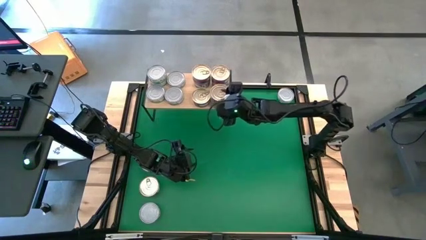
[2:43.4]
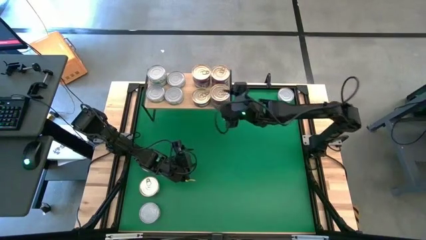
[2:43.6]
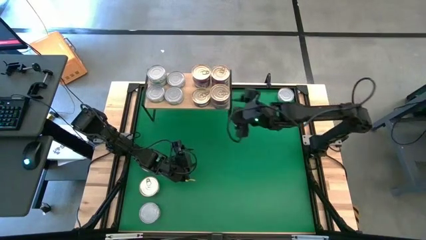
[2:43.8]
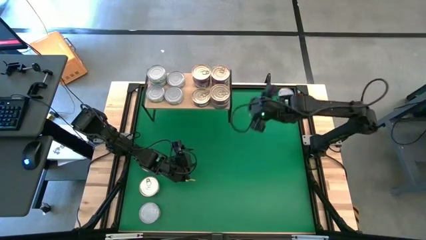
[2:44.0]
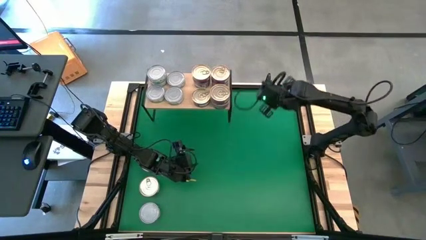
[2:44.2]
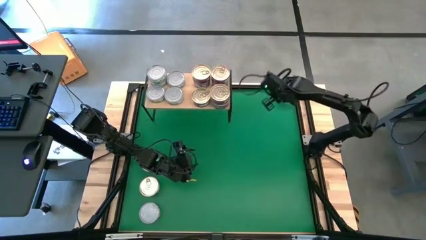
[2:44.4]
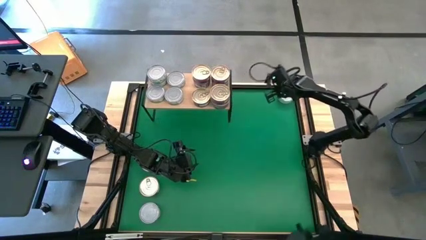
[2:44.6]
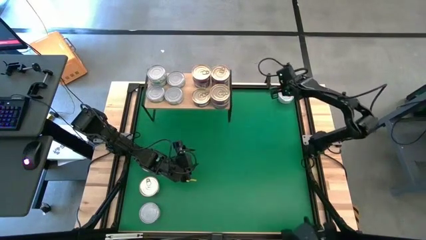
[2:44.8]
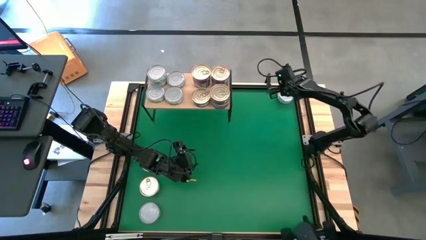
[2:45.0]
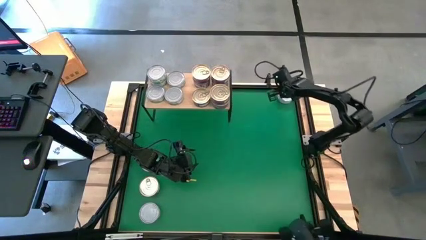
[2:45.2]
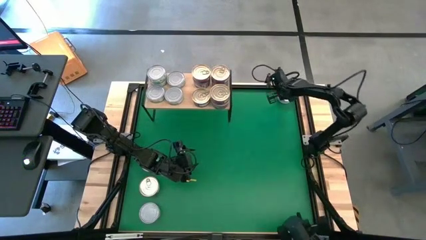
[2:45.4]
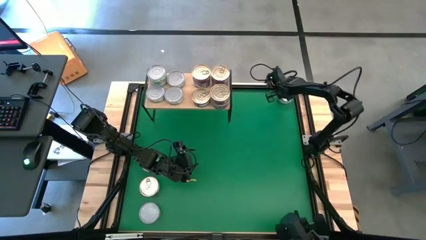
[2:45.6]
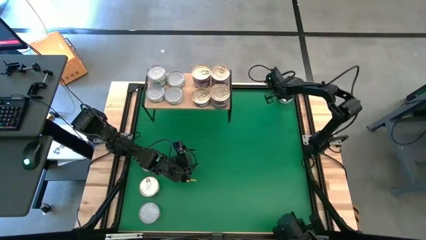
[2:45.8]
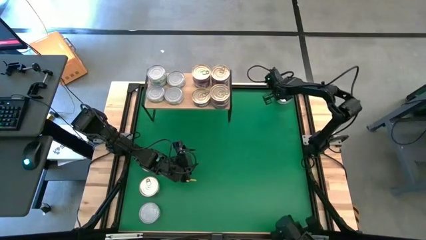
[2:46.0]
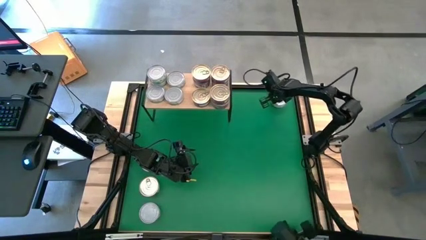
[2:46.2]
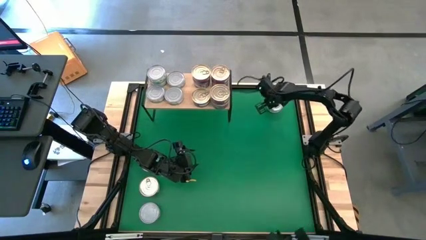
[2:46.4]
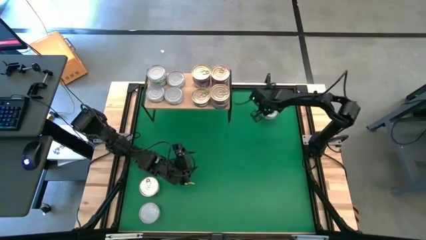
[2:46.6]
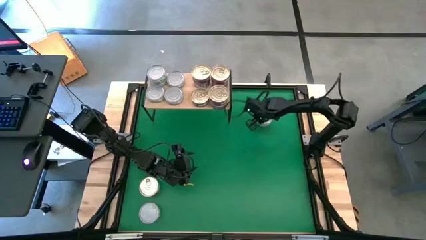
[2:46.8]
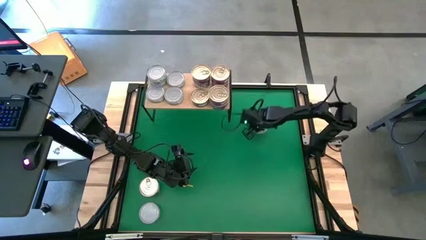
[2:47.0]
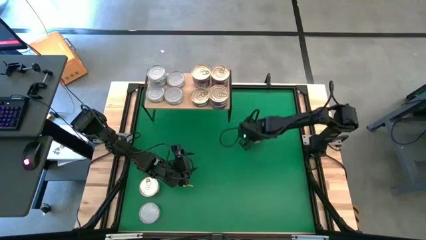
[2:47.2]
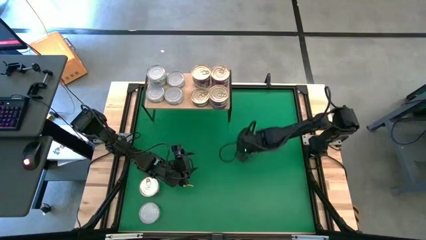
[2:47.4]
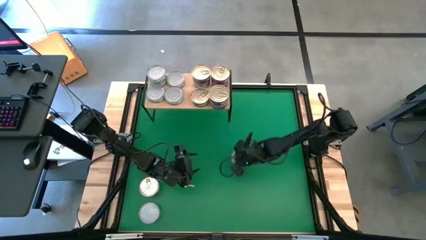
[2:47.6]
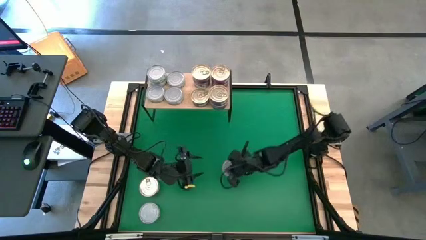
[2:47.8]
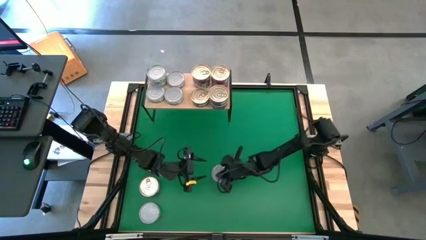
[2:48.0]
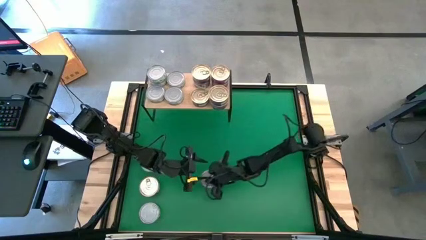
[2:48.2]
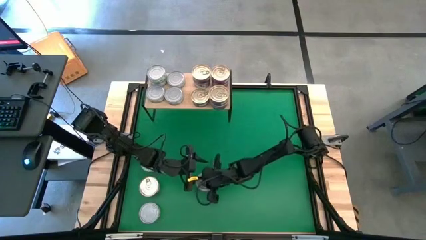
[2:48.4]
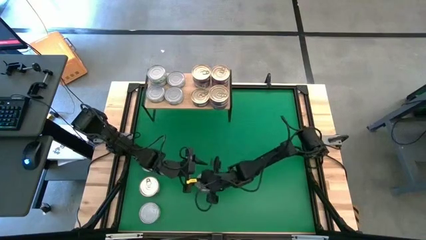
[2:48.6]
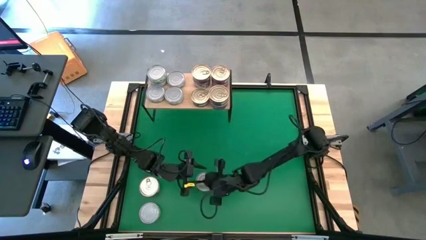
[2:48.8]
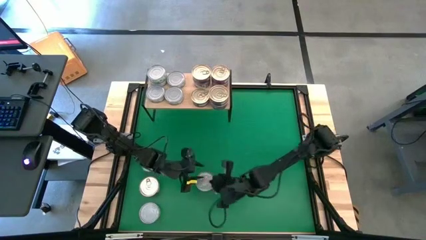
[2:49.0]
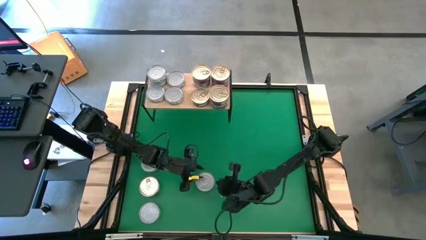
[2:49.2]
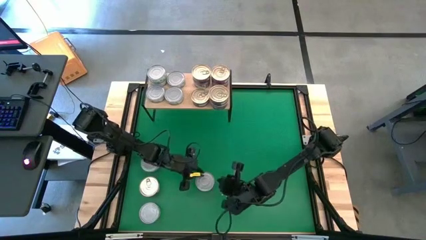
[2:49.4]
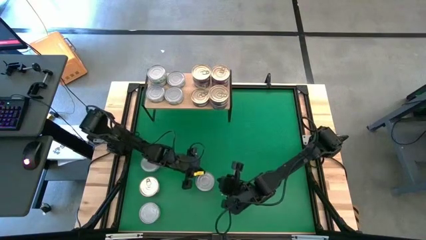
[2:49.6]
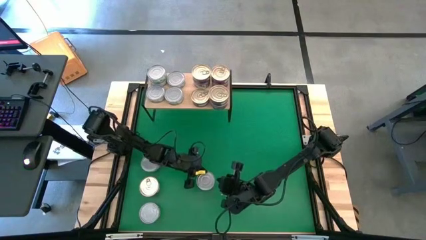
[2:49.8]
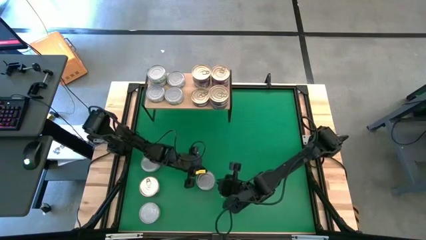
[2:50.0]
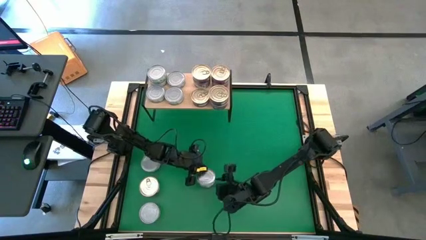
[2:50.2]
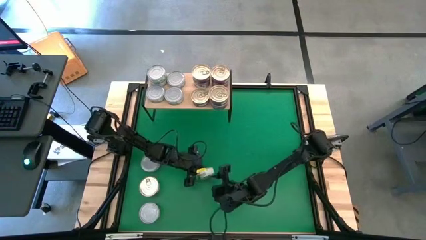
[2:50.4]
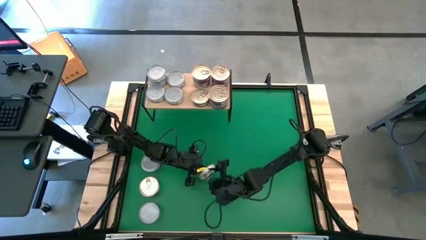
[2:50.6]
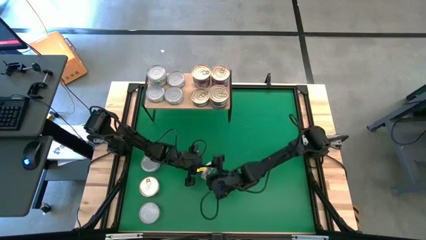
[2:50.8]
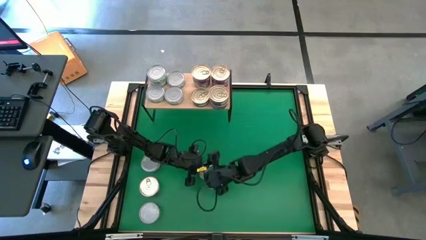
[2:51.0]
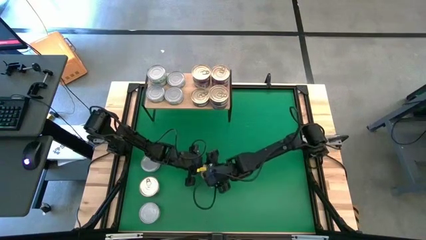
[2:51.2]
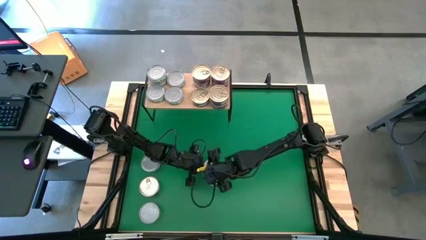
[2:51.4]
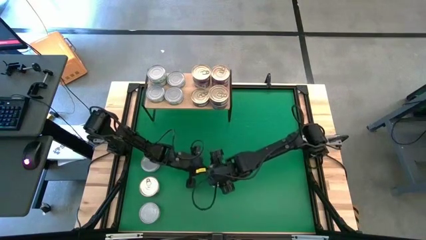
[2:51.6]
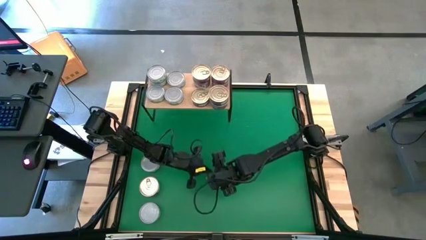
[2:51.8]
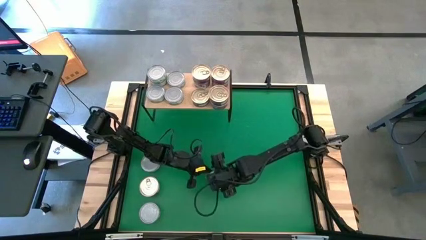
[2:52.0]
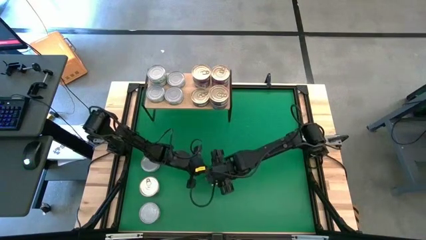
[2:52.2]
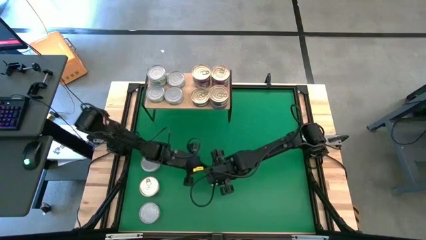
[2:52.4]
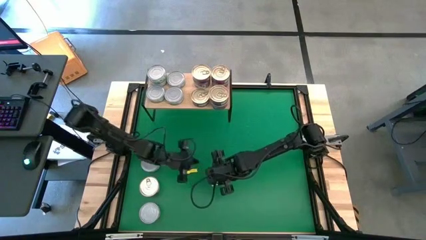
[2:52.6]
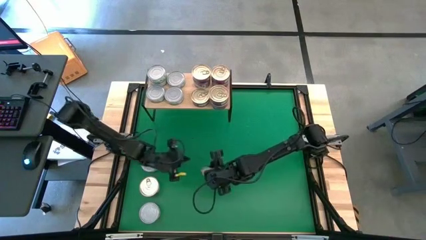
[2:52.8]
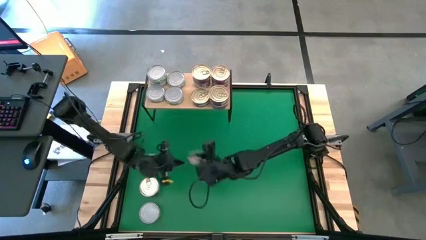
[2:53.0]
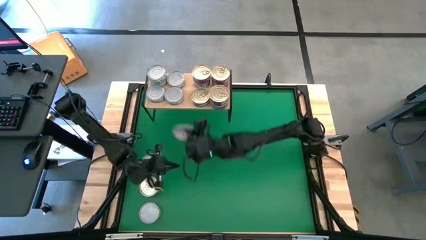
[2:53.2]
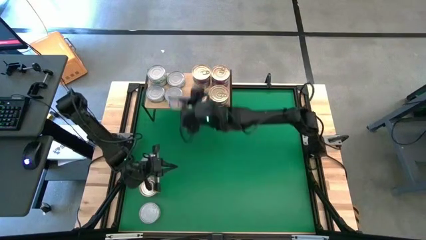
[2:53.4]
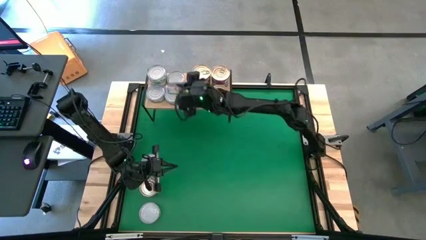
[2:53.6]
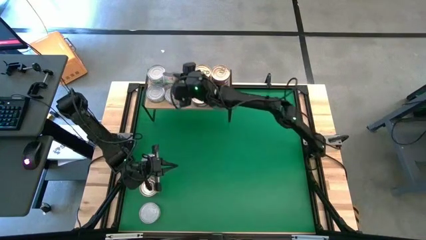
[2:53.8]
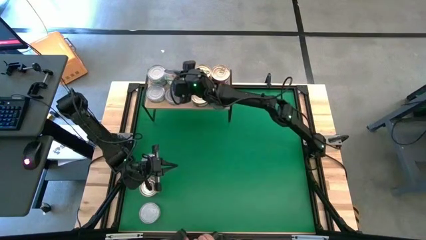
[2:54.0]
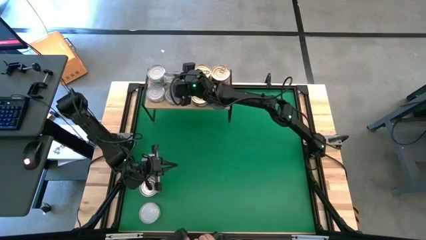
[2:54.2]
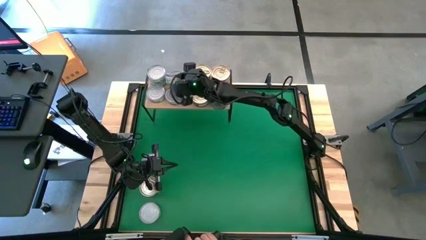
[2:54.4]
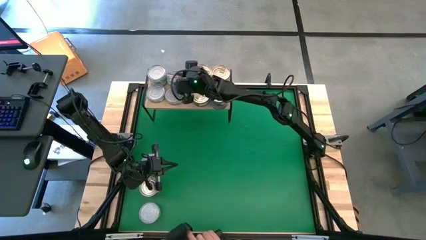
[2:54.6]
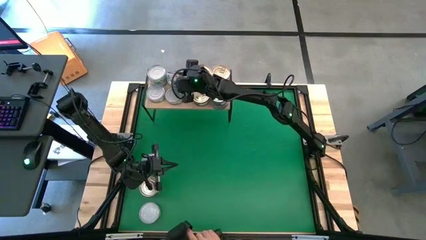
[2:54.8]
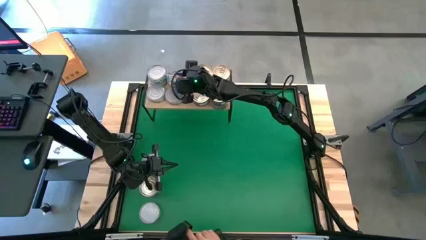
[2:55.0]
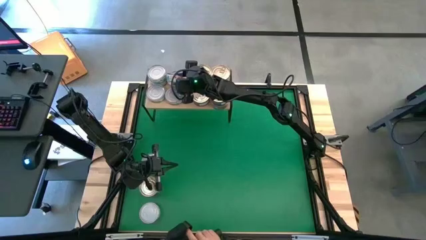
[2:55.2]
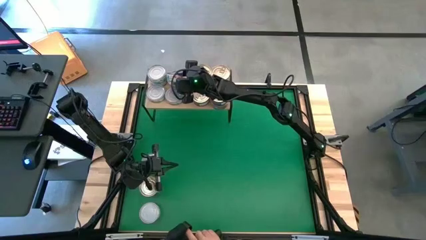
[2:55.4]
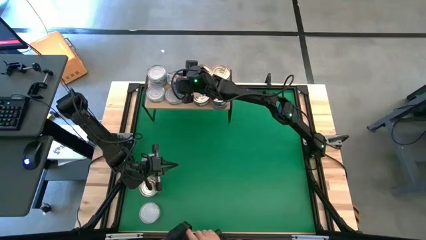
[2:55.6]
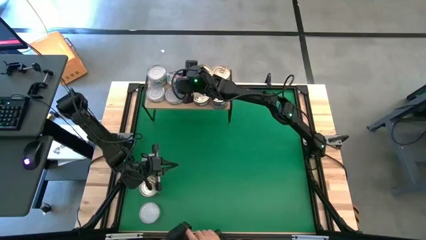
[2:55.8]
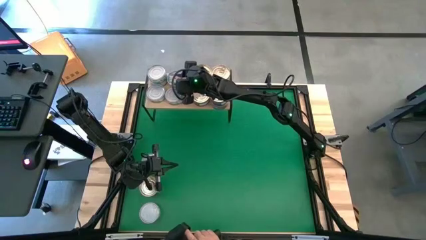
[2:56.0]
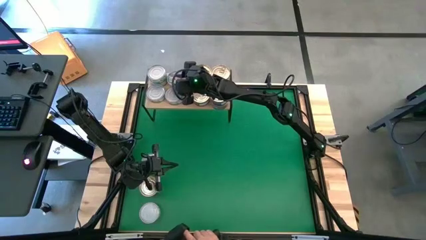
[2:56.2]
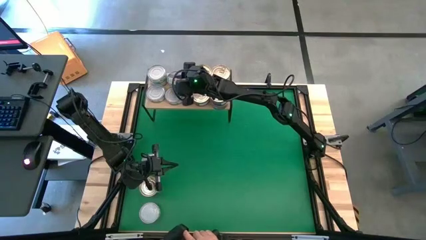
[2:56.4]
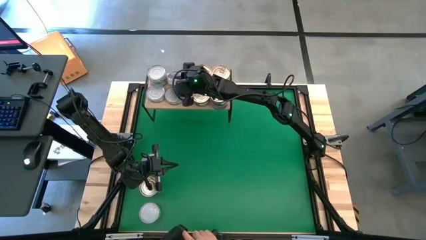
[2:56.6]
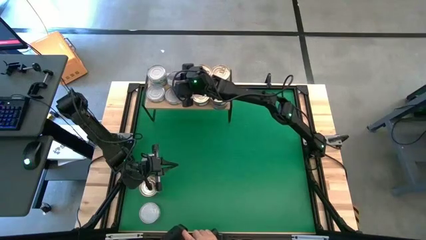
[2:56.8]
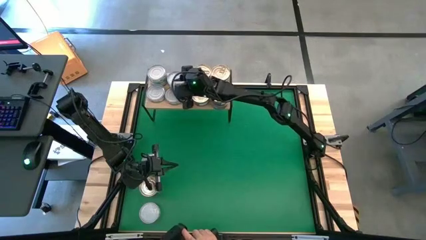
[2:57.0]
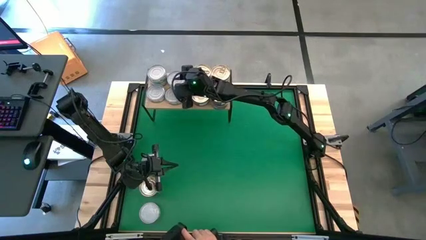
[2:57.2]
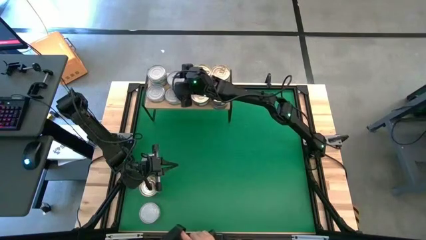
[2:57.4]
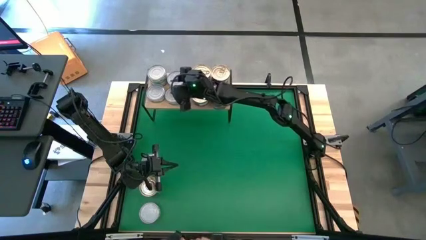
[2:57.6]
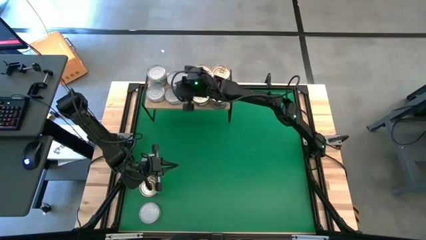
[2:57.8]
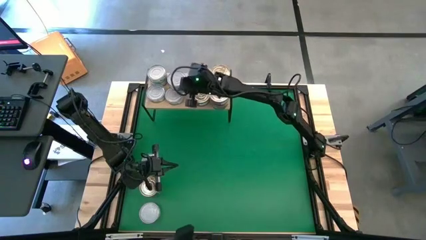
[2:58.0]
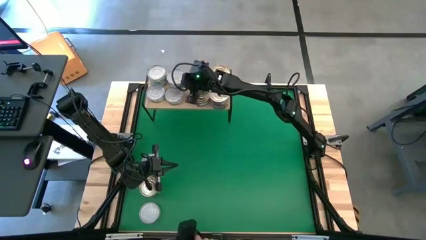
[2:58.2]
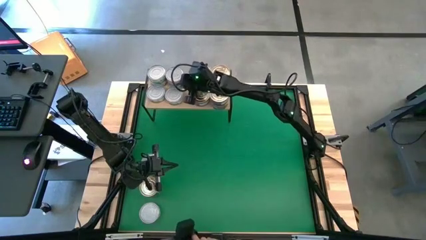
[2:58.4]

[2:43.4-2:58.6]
Task: Stack canned seafood by type on shelf
Stack the green tuna can on the other green tuna can on the shelf
